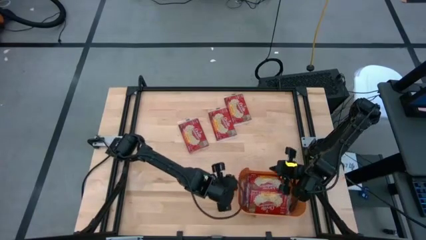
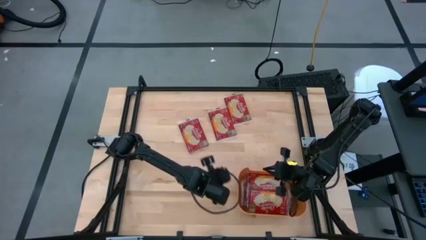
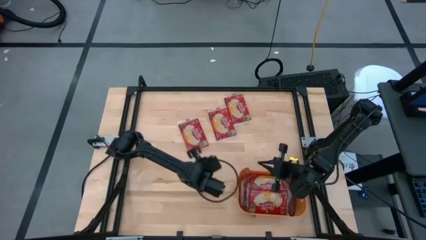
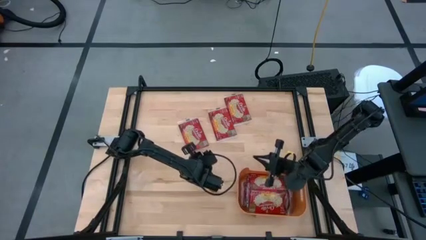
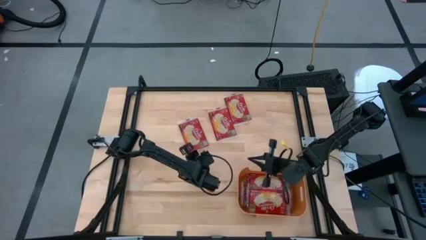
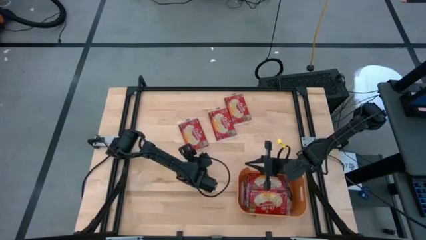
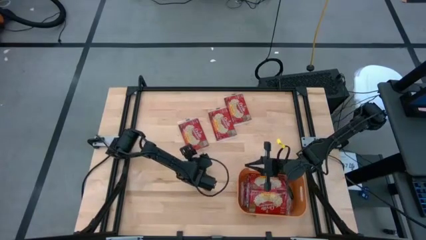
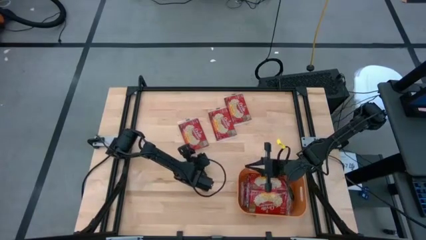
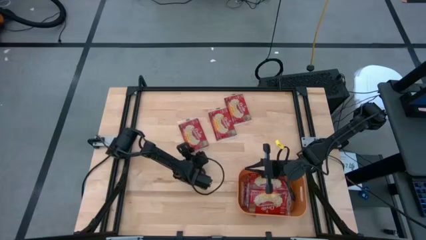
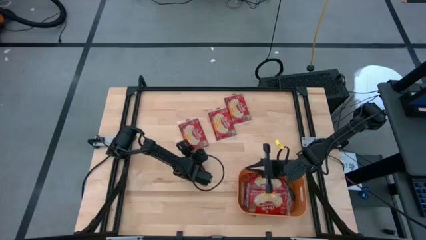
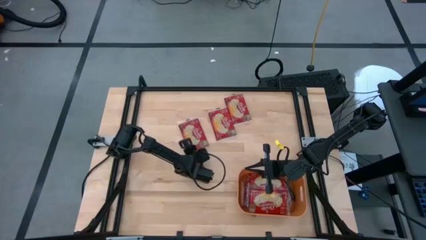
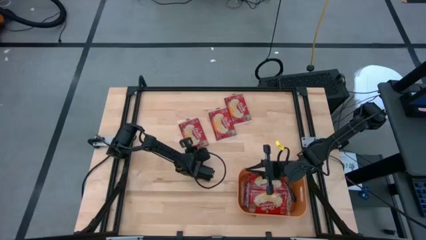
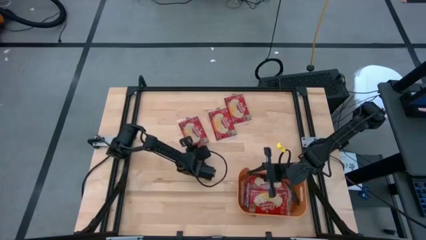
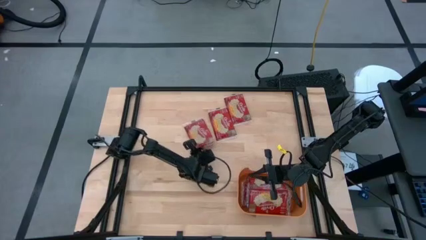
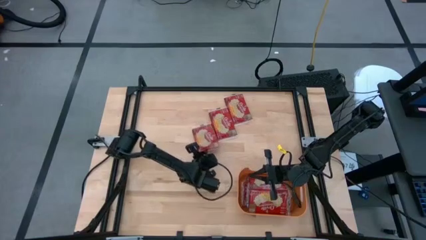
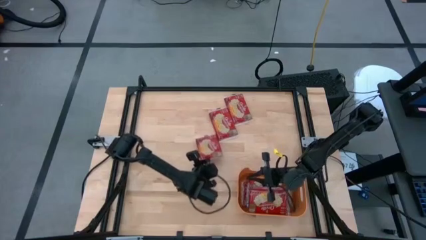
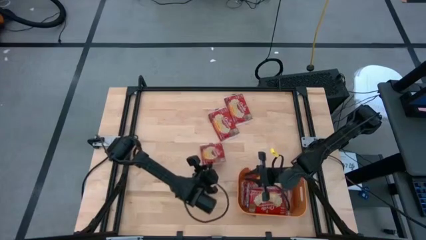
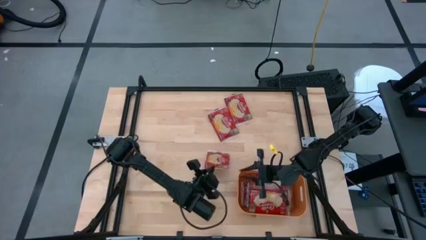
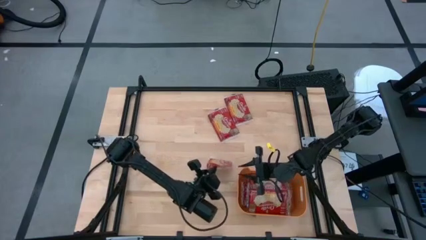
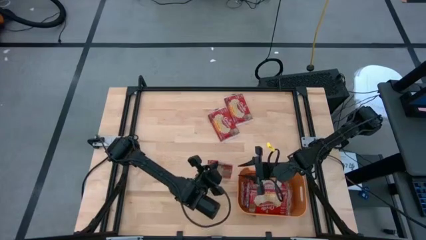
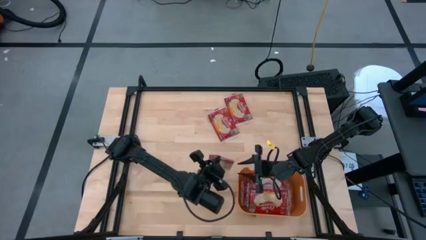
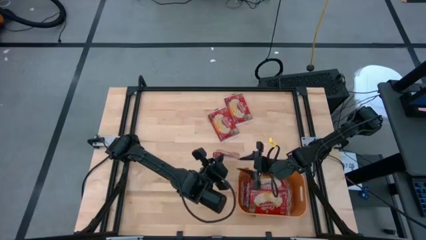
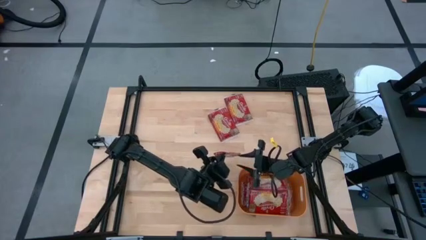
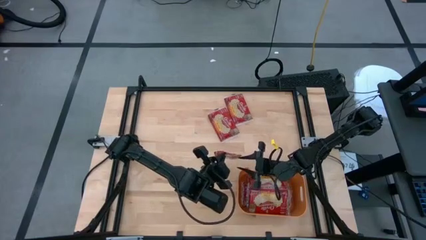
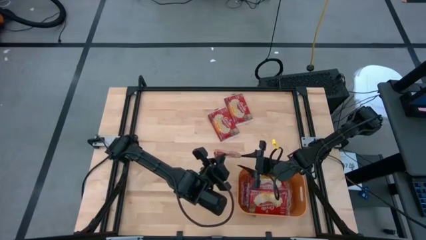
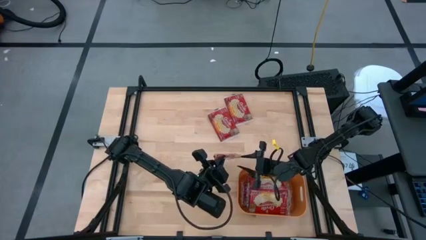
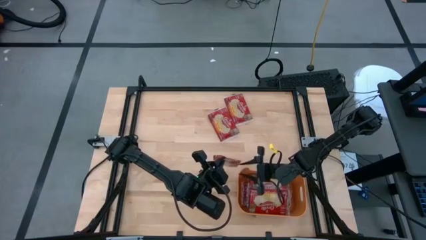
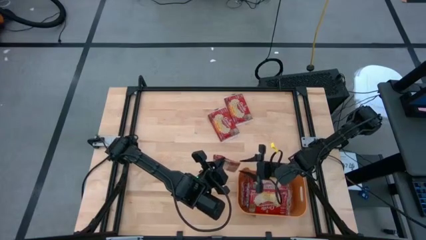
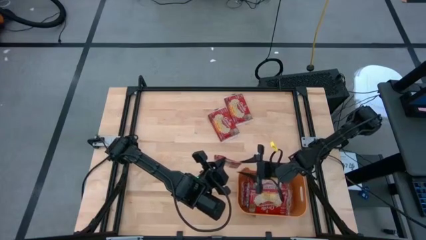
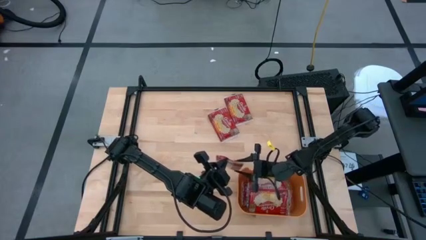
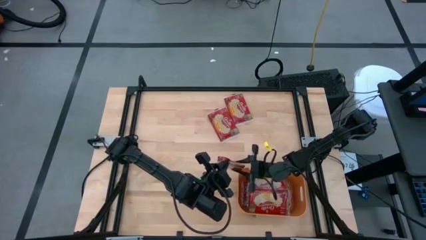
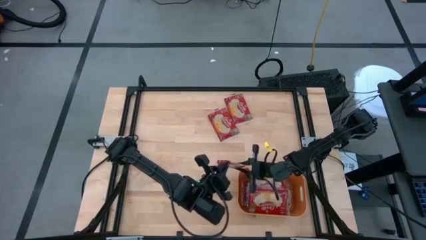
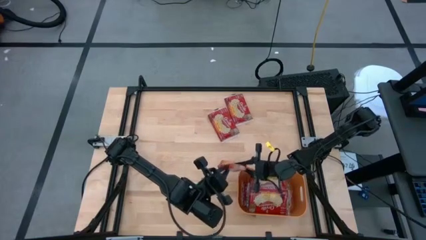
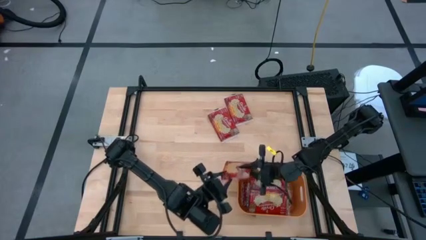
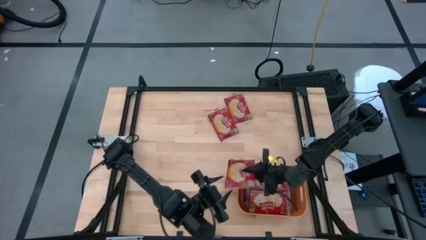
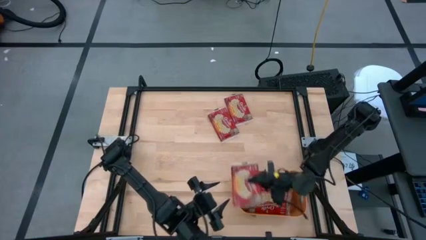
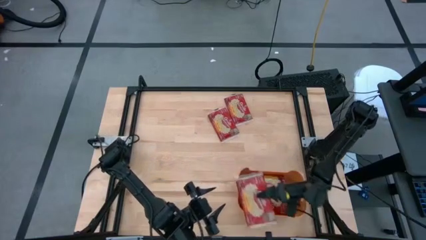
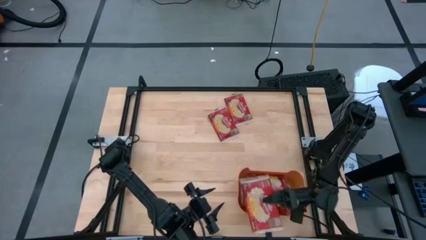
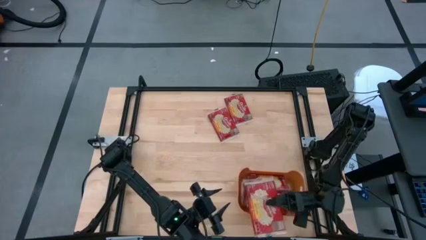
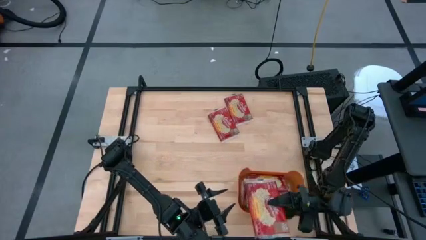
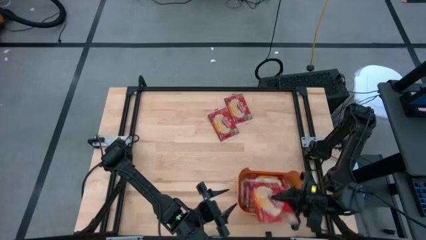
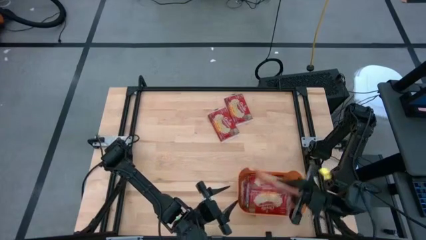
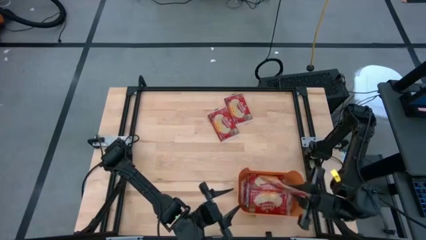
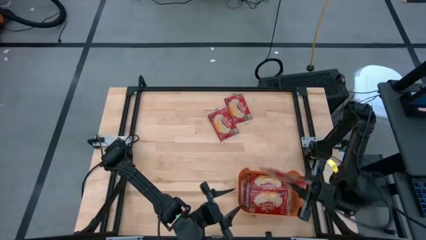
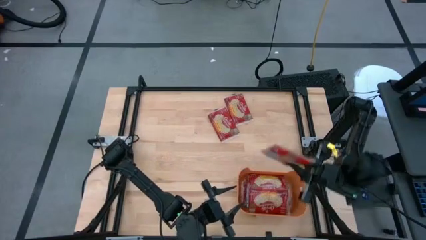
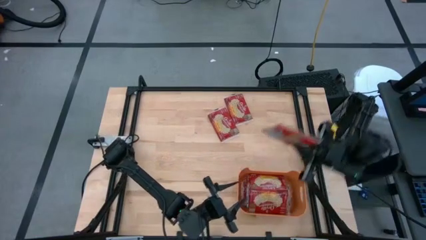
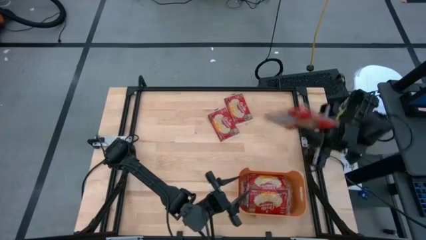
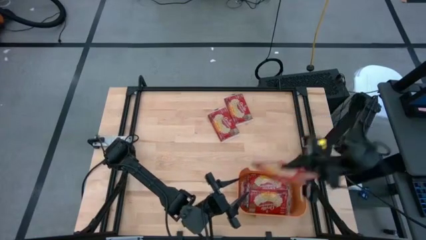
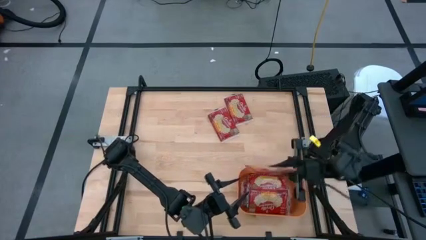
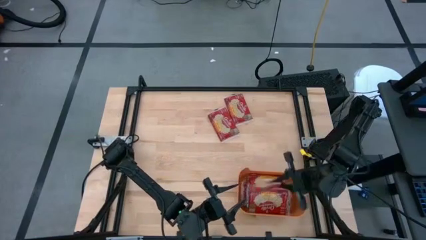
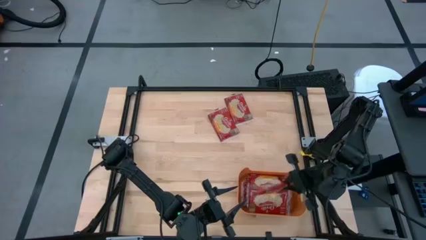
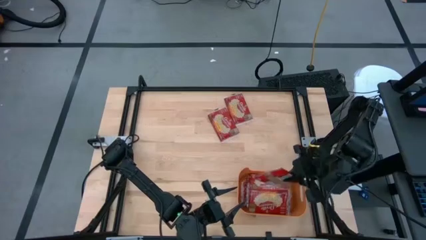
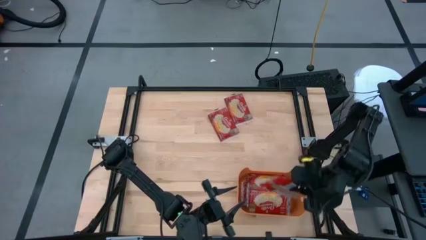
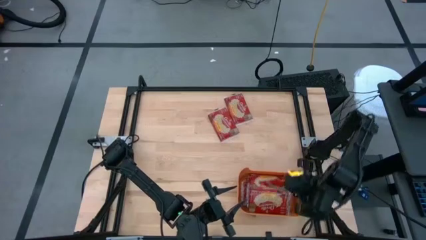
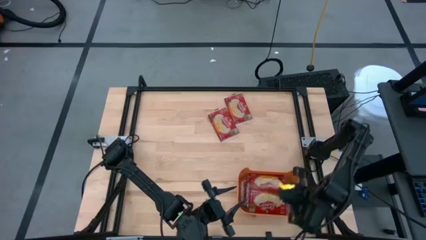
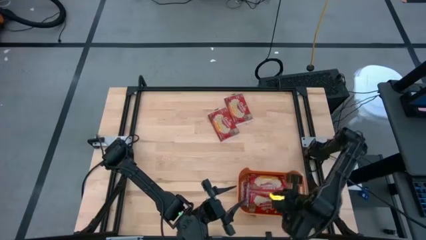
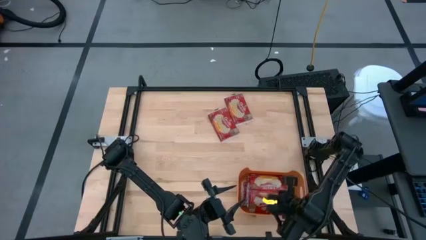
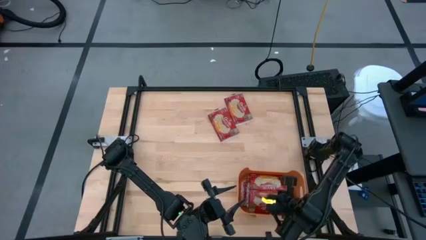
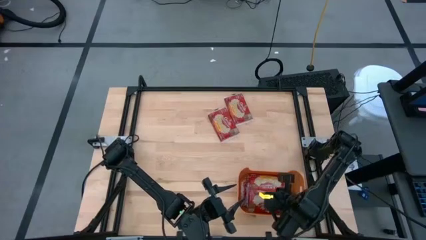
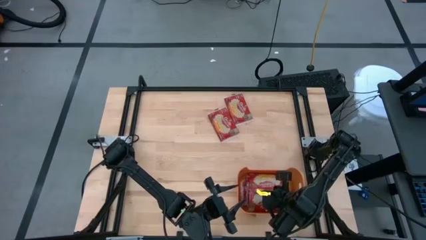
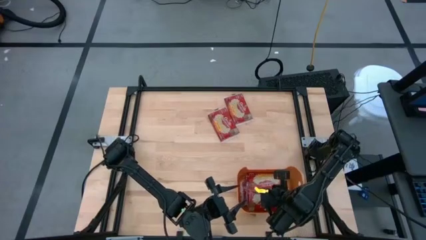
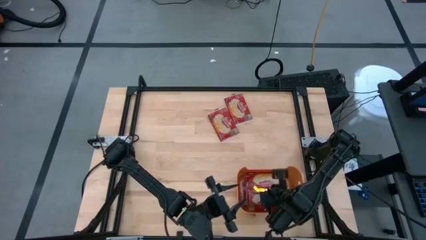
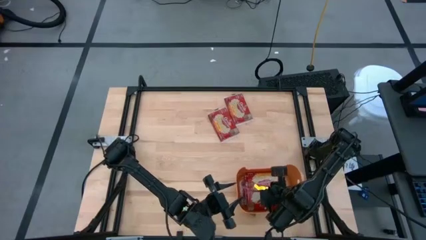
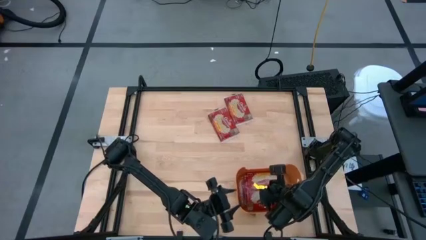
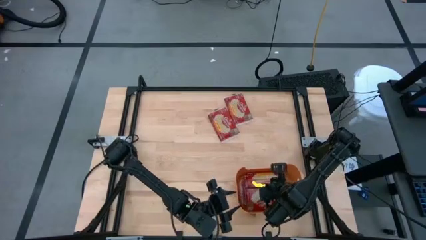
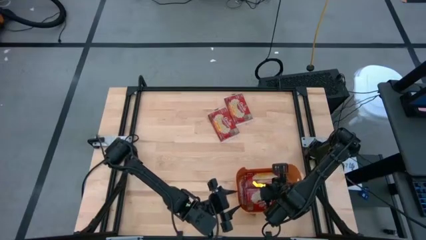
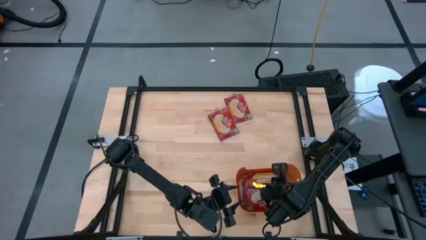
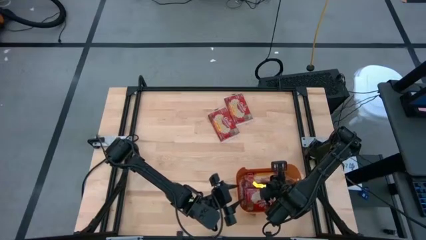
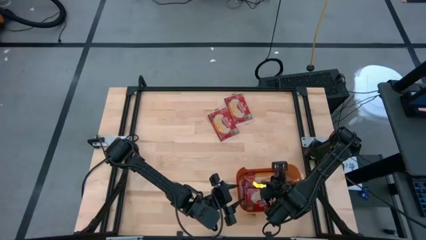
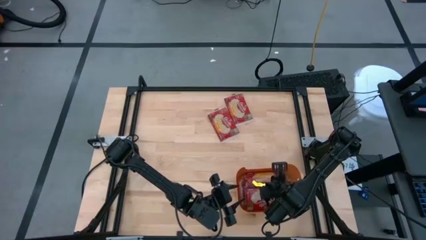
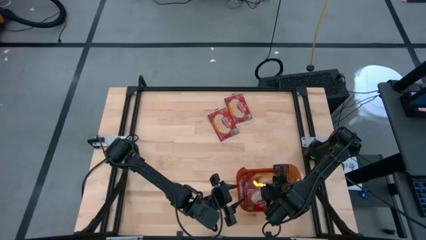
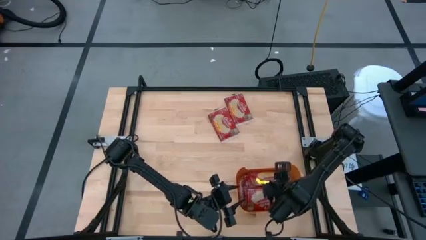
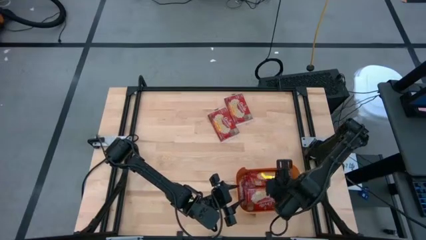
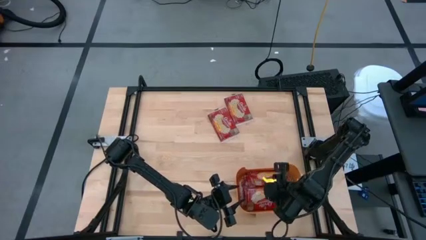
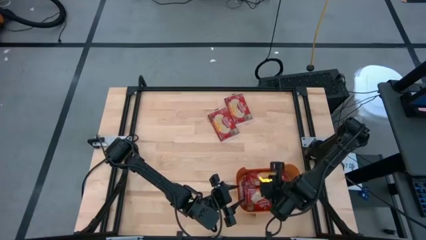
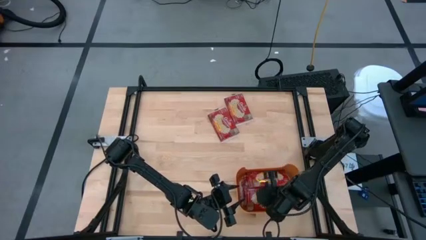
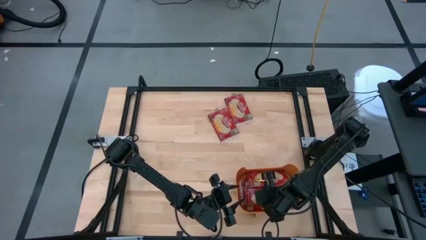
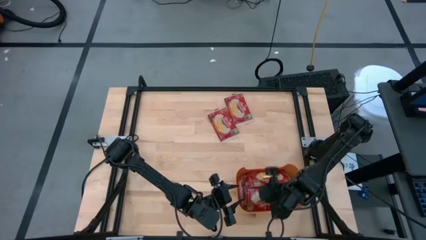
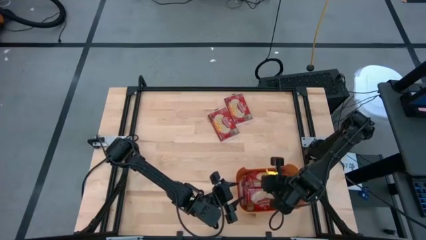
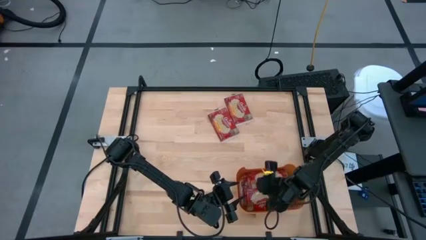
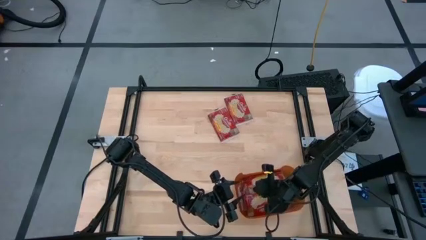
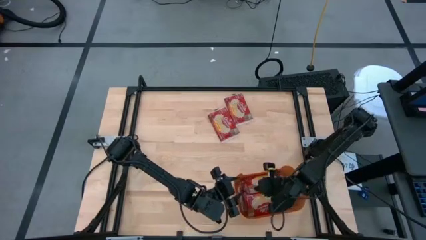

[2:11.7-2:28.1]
Task: Sort popcorn bags into baskets
Put the red popcorn bag into the orange bin

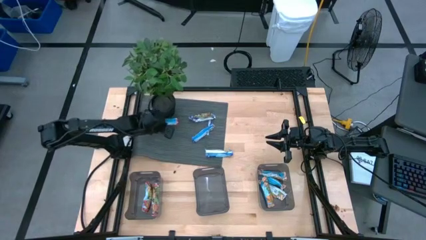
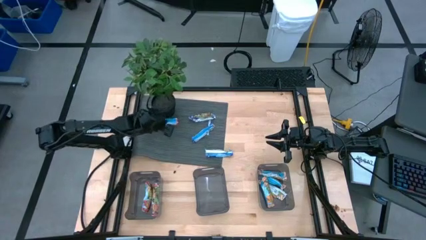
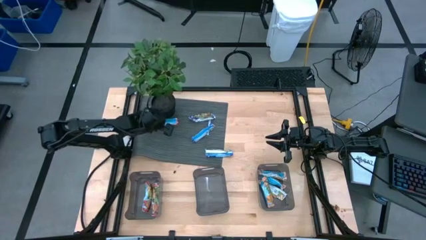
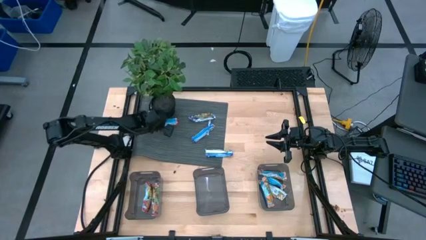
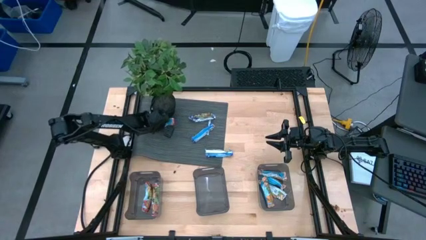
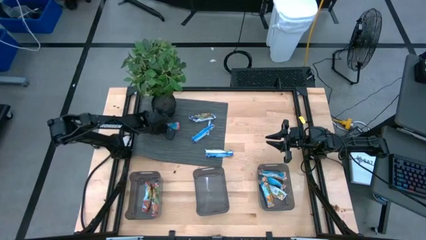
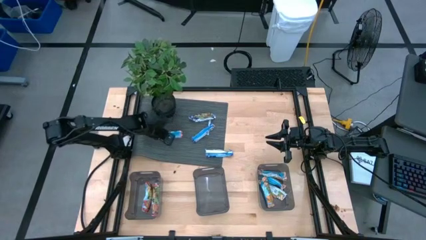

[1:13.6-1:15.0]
Task: Pick and place Granola Bars by type
Adjust the red granola bar

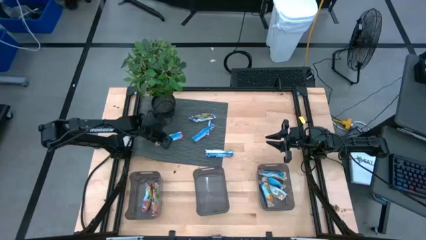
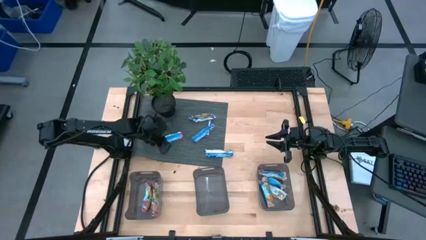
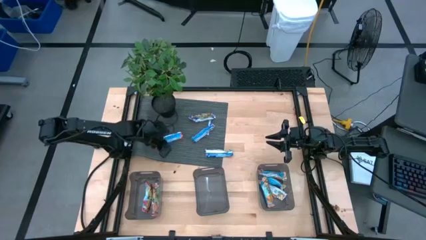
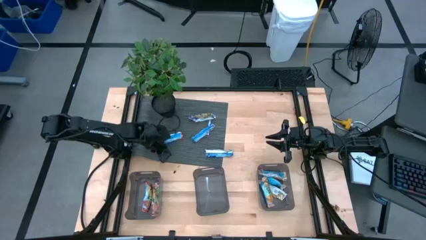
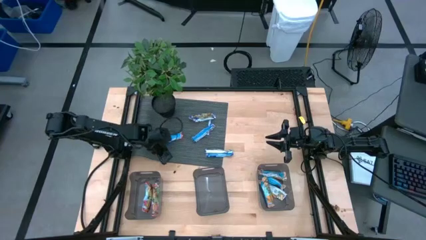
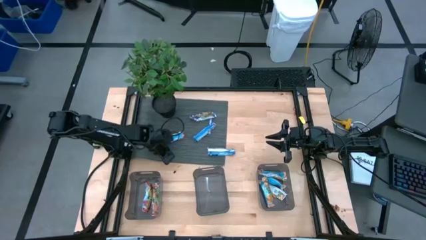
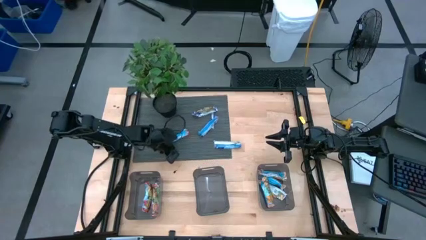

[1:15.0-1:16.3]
Adjust the black mat
